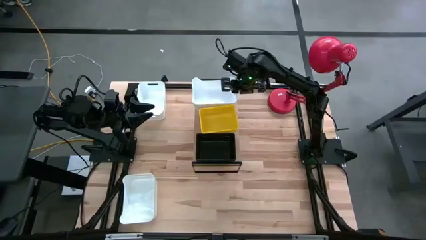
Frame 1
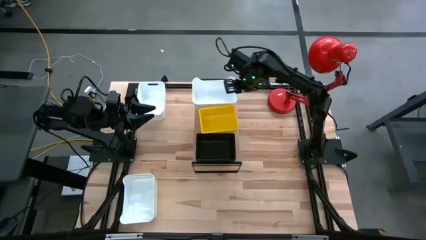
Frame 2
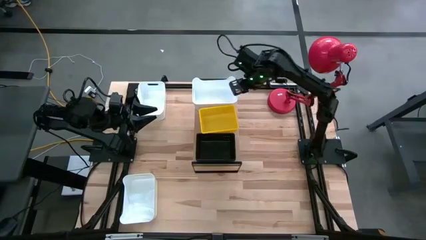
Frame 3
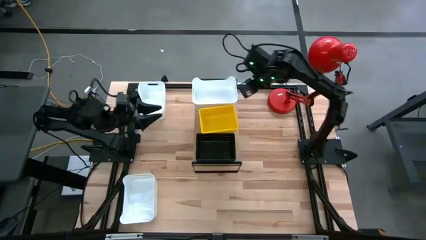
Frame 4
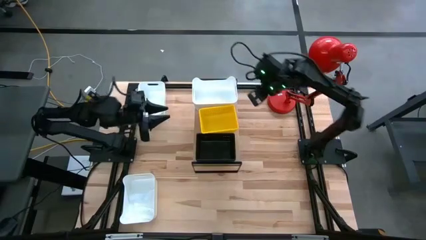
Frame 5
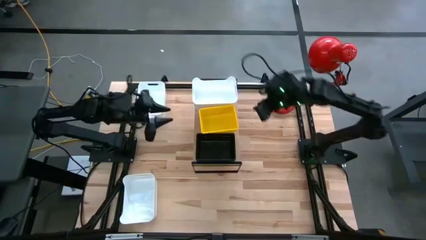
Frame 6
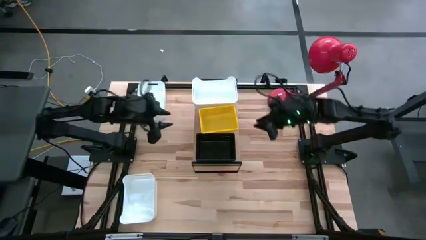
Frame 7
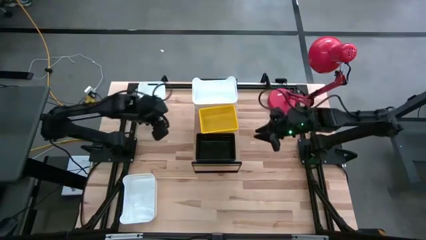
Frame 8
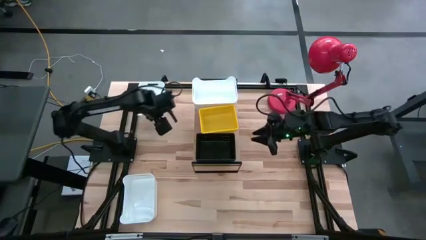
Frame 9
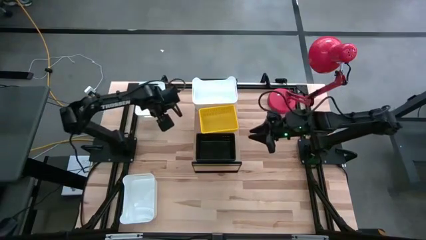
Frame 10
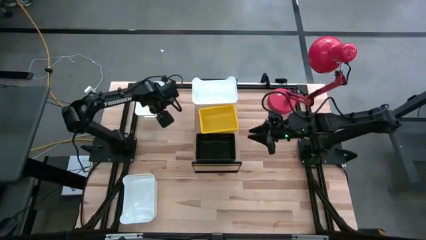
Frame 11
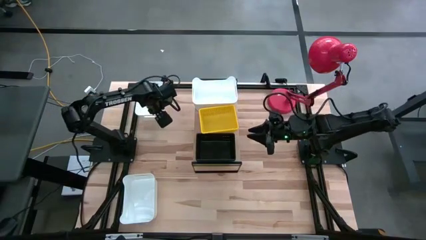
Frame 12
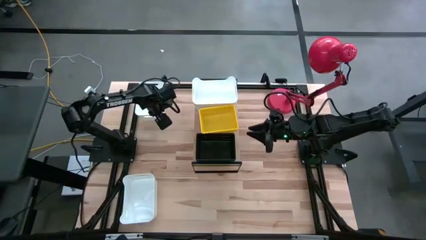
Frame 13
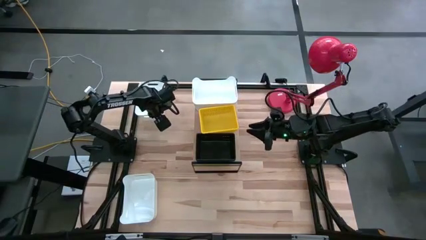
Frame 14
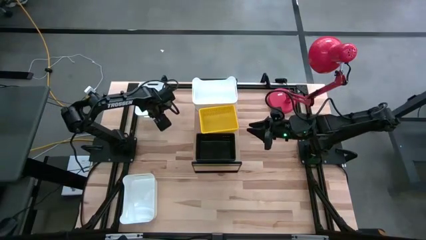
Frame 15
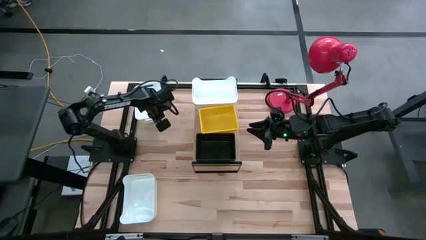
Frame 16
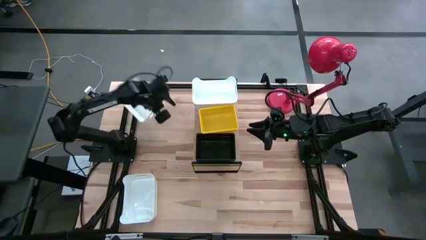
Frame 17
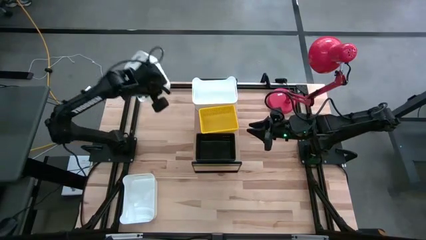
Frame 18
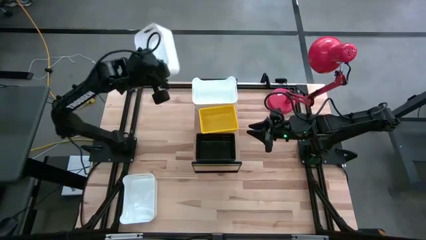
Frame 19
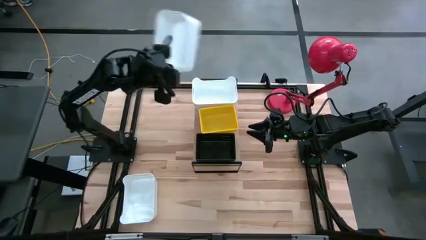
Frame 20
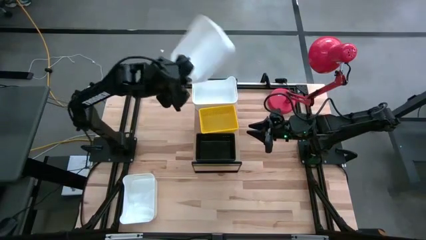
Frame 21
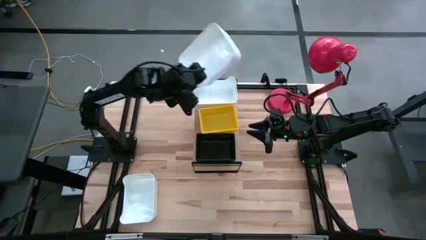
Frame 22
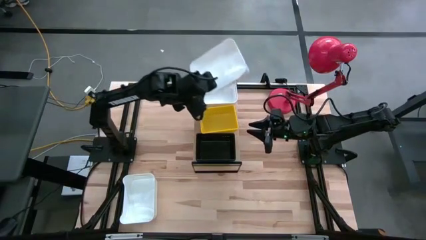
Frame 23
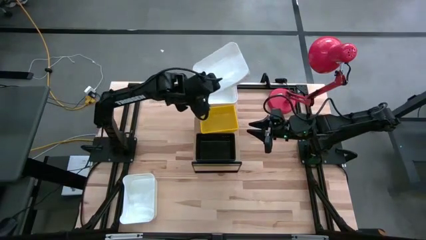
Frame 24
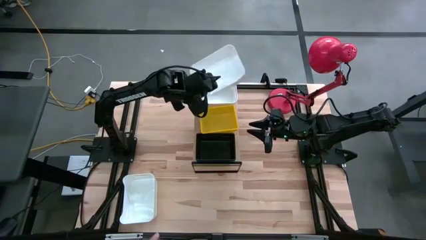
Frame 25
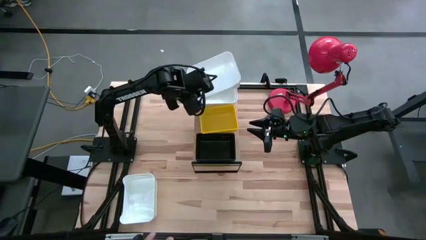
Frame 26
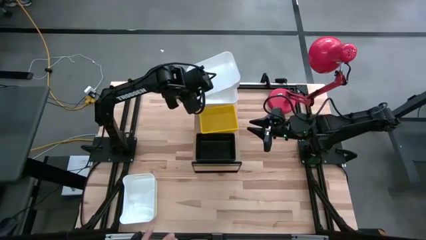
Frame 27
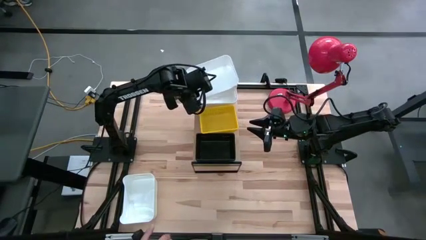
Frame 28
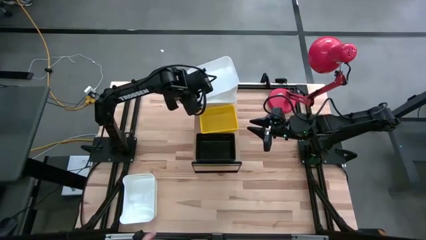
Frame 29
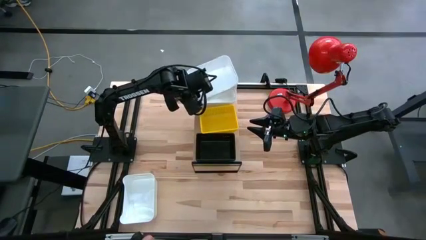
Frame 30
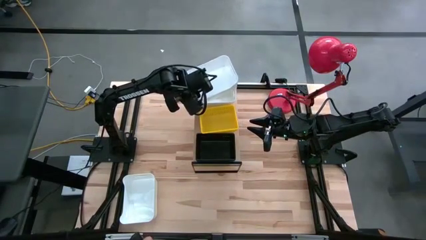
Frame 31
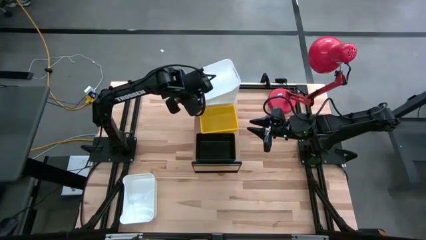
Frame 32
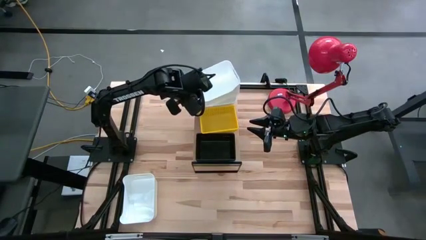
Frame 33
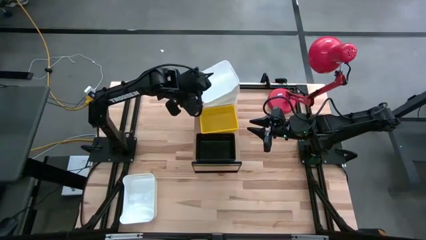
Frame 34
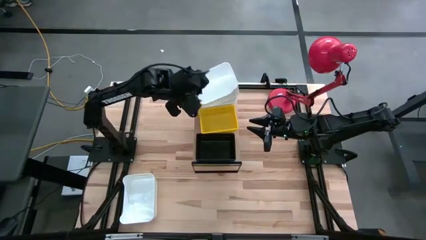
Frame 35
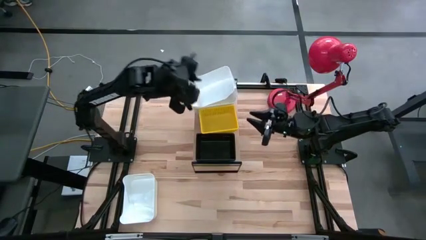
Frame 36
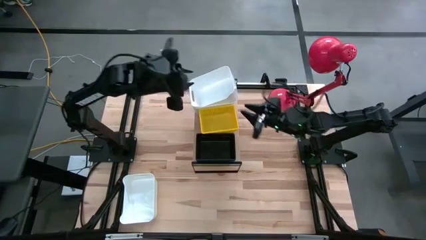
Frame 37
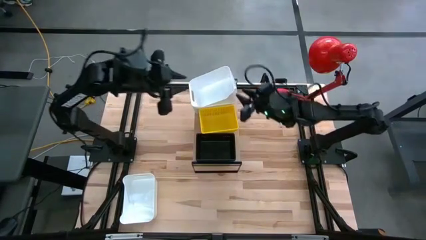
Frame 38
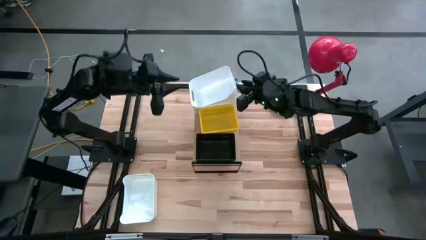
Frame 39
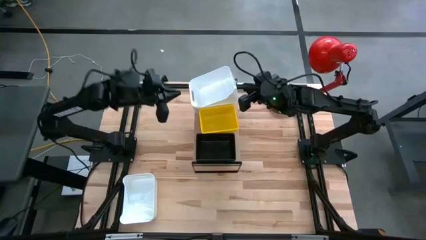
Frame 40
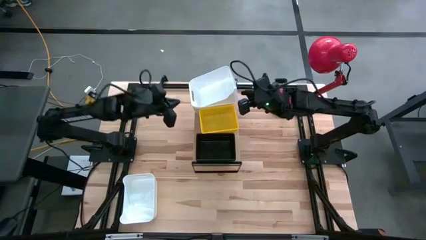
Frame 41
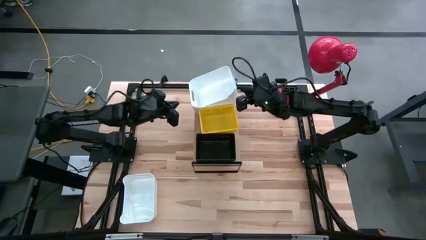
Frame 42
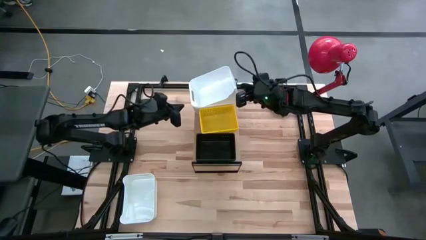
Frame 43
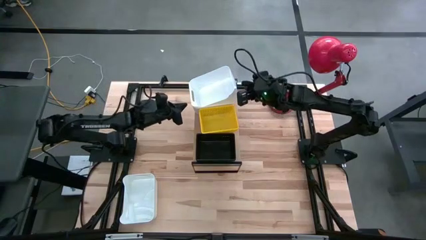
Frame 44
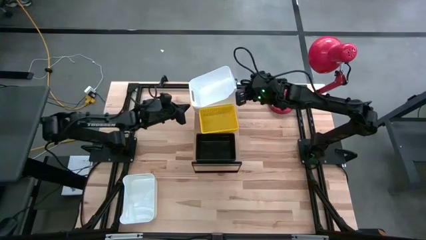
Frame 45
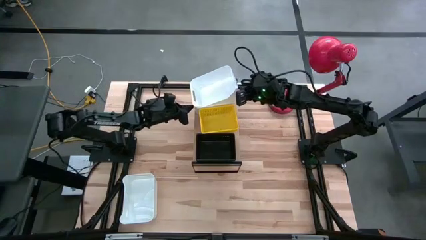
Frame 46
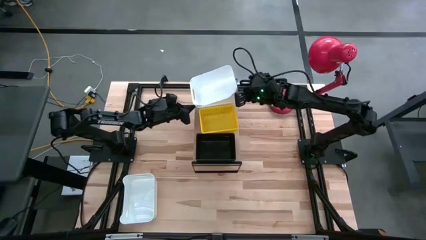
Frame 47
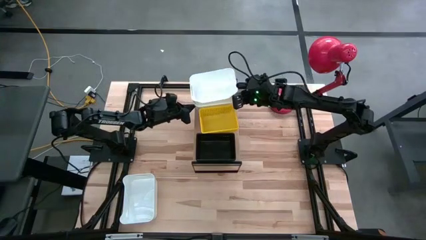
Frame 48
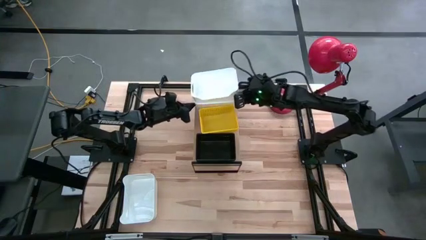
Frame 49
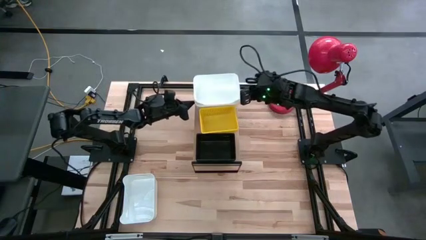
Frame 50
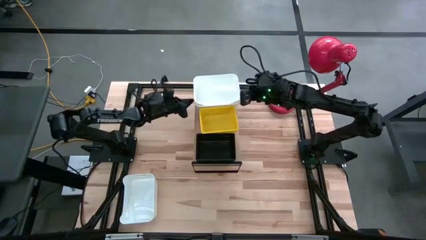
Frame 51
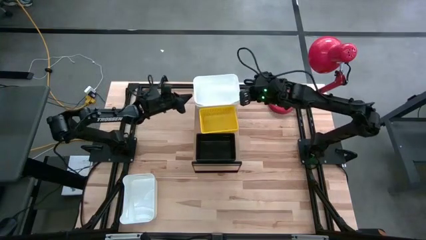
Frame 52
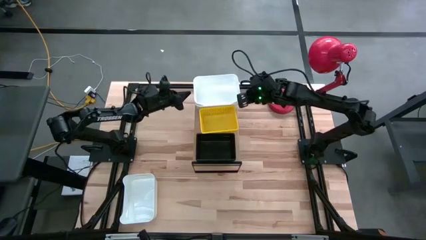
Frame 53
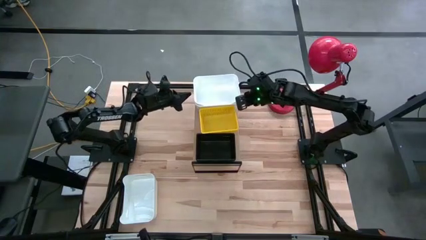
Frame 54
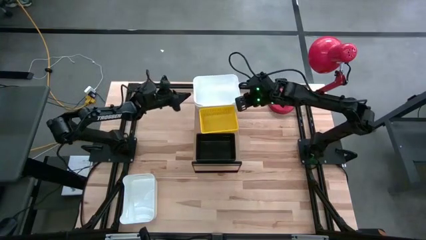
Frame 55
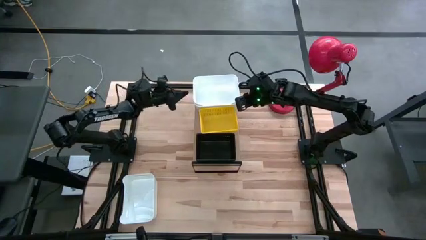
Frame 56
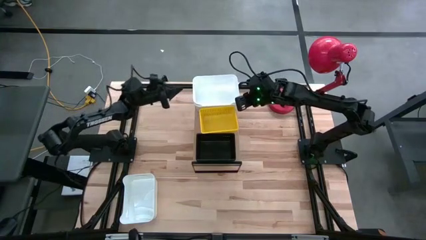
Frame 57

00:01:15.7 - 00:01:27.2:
Task: Stack baskets on shelf by color
Stack the top white bin on top of the white bin on the shelf
